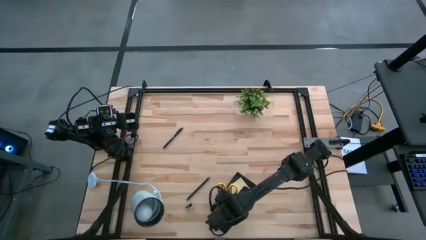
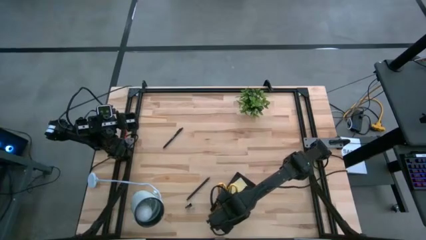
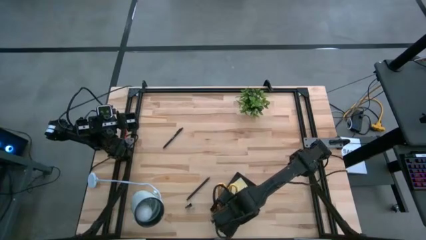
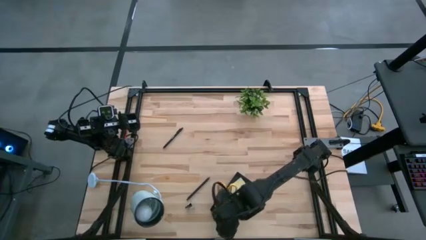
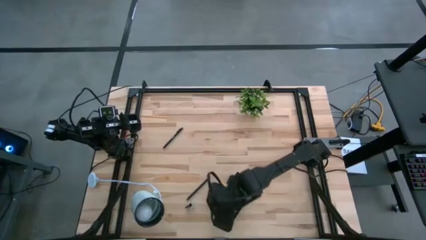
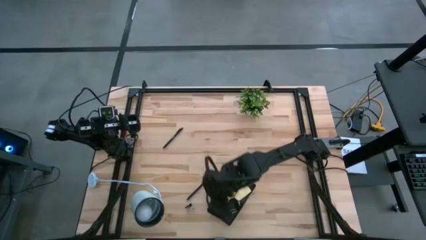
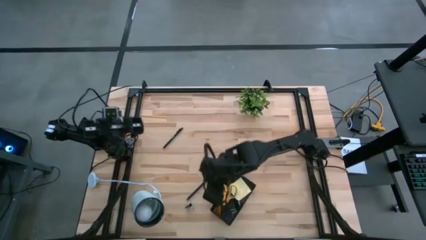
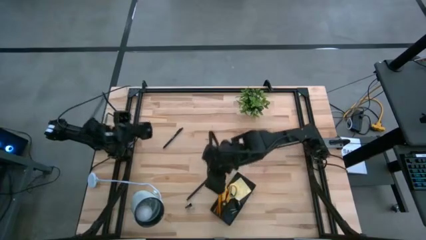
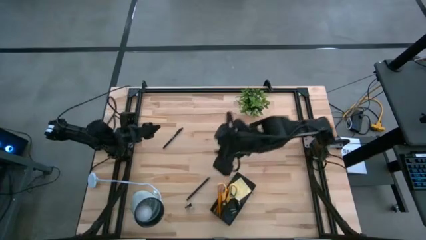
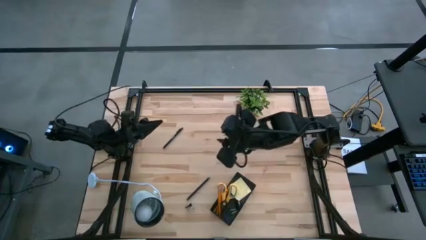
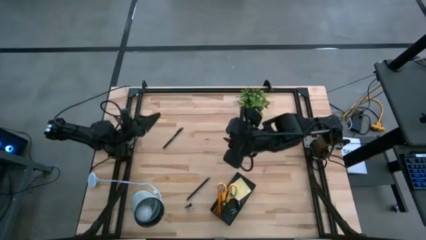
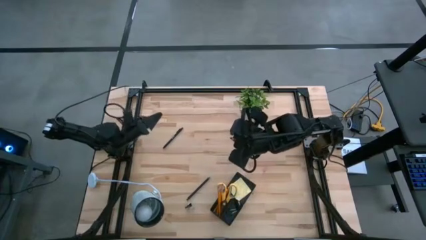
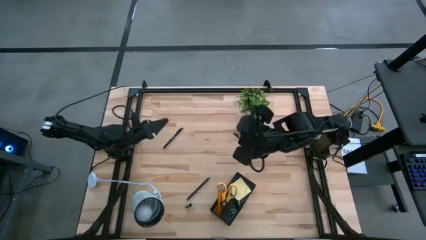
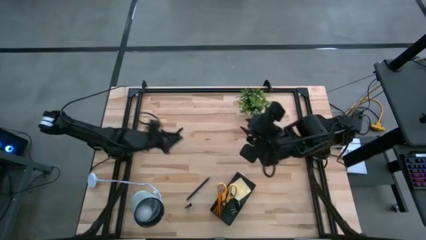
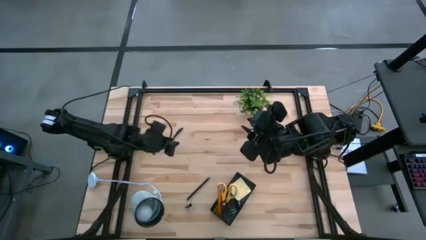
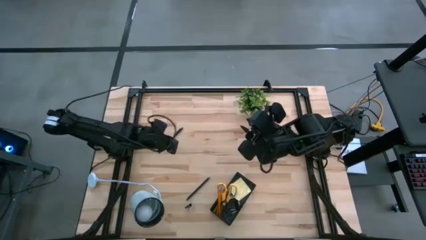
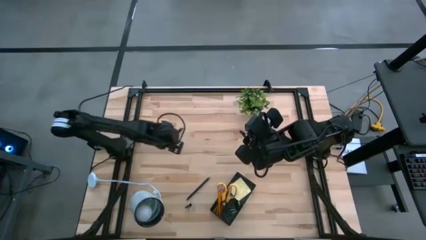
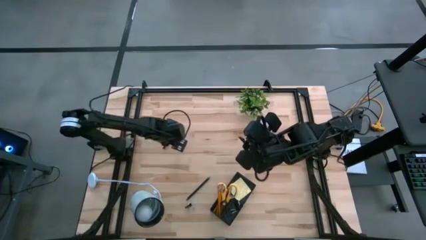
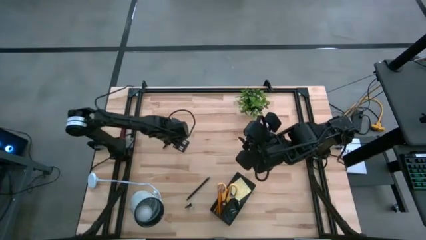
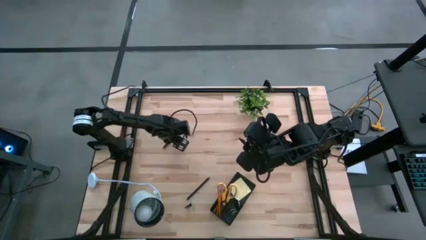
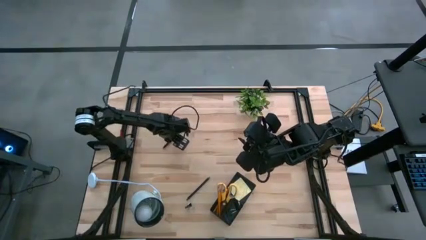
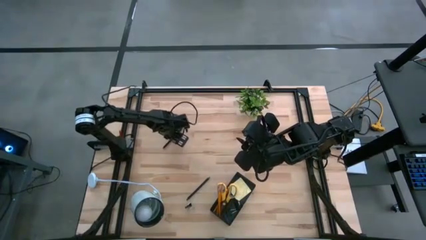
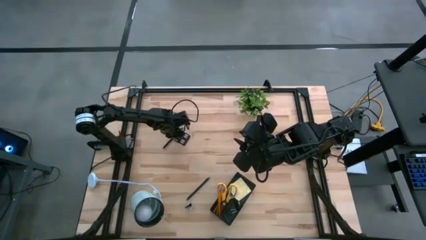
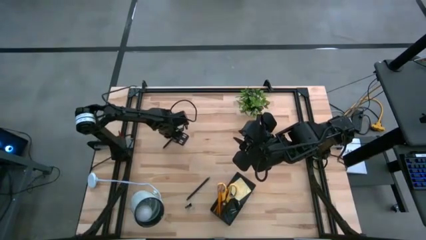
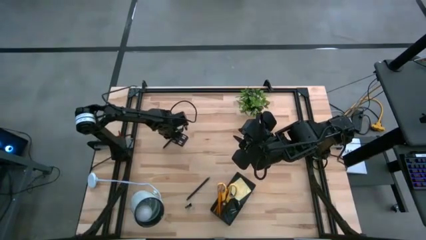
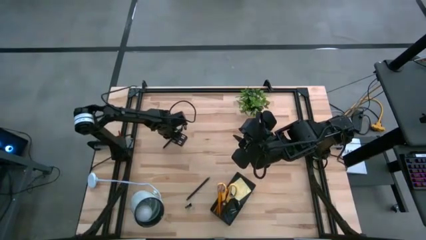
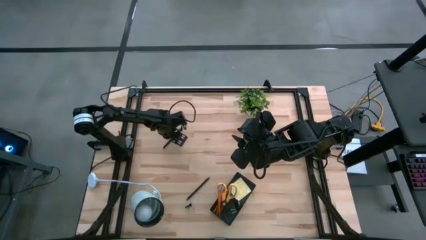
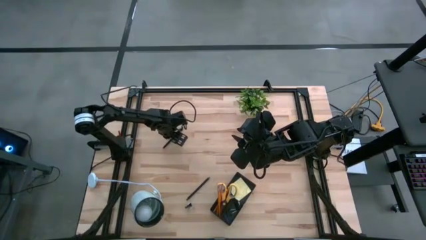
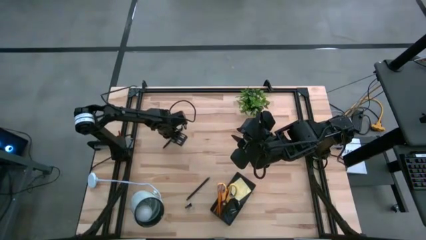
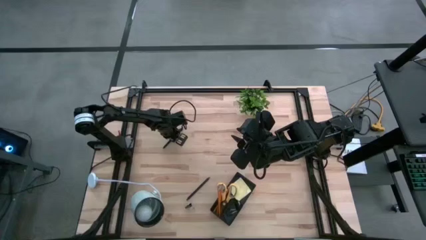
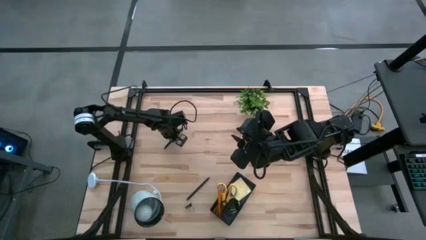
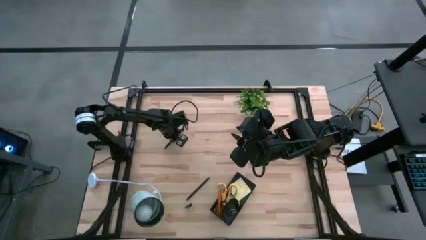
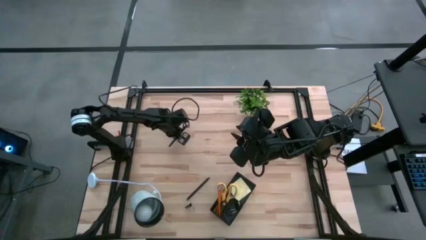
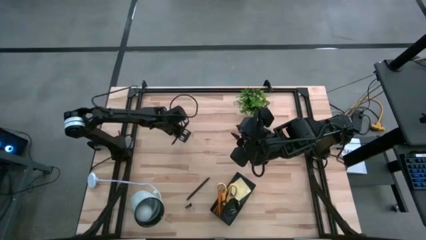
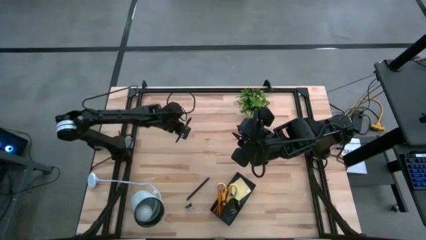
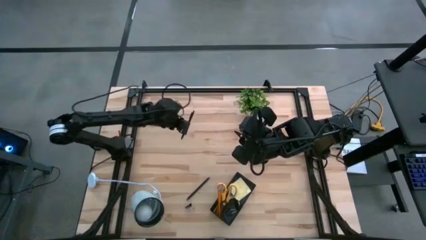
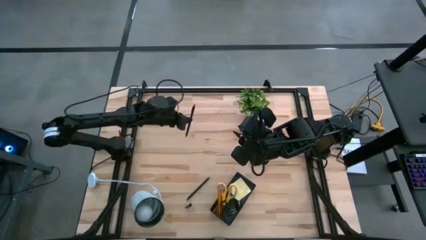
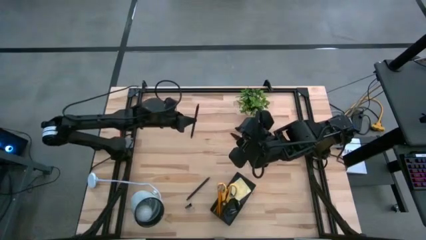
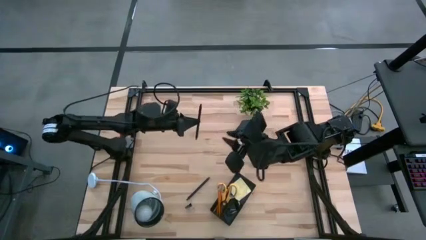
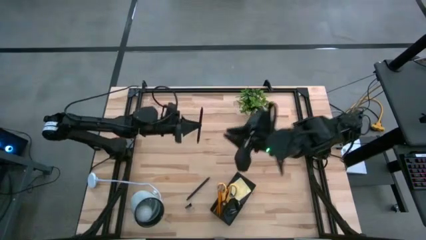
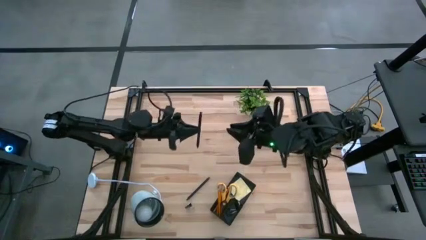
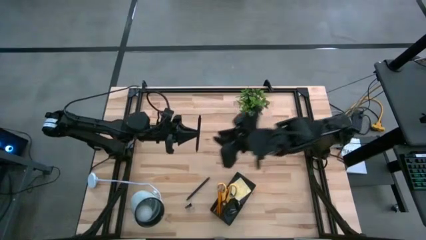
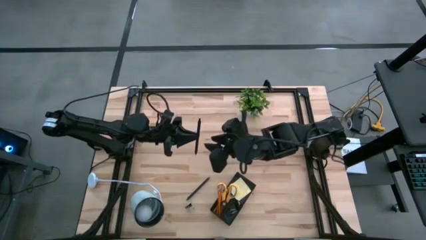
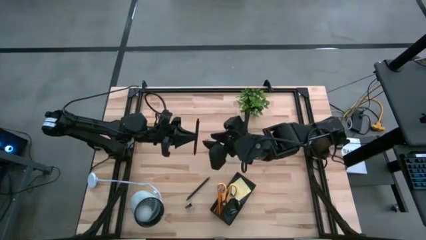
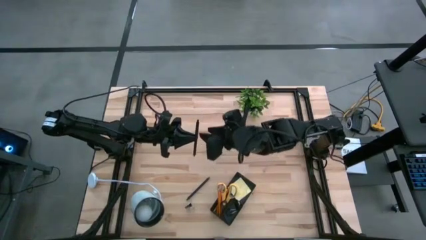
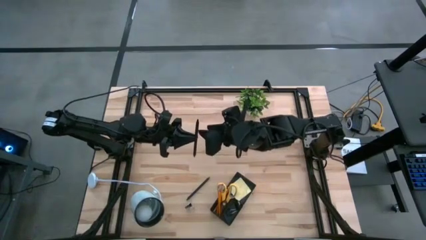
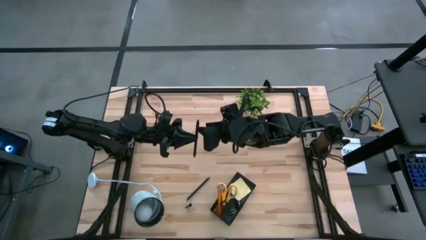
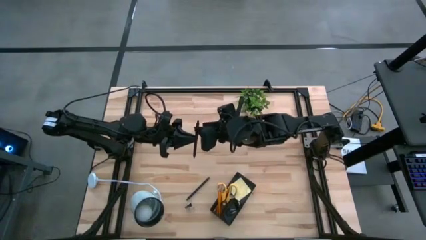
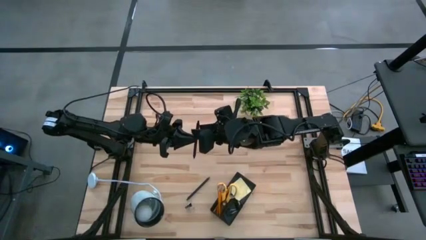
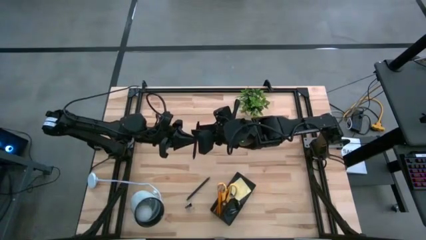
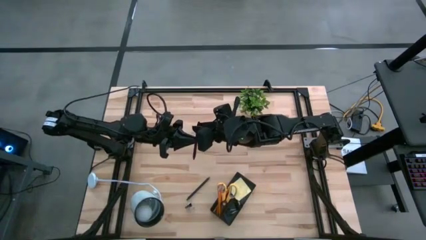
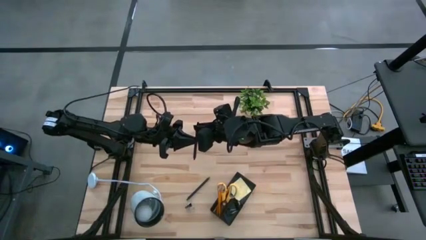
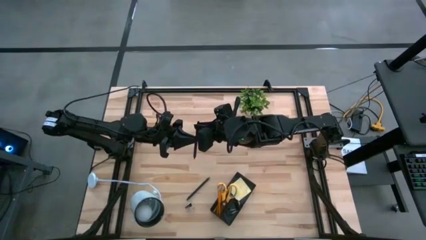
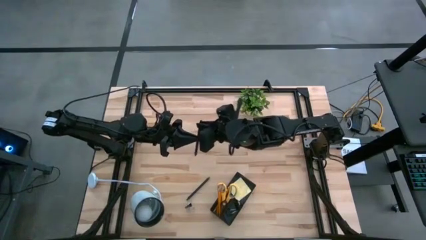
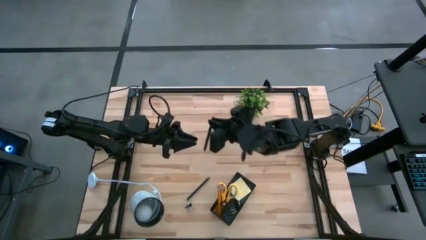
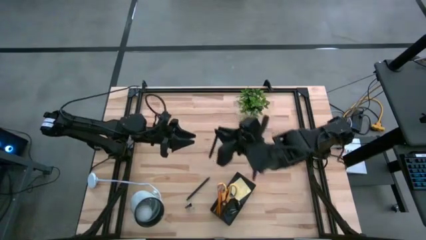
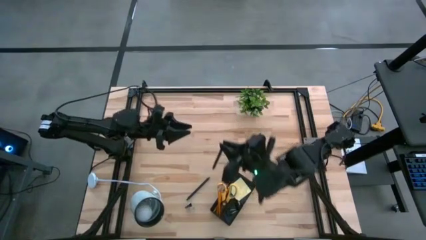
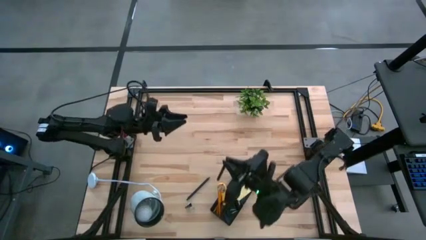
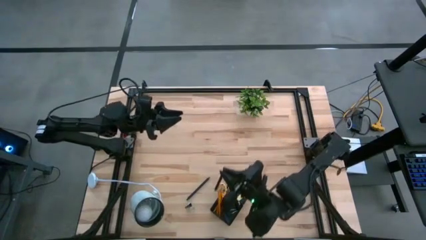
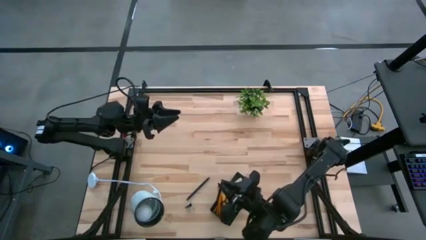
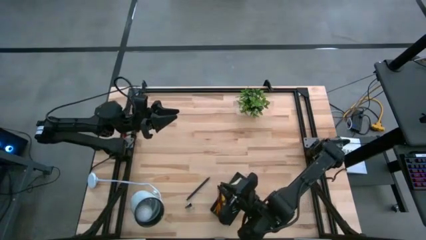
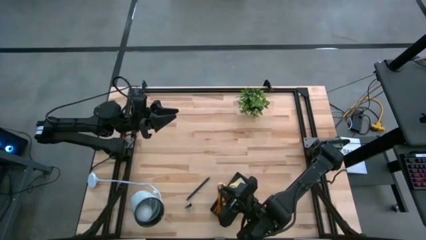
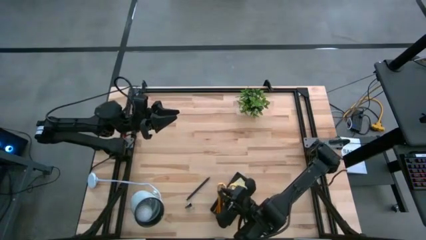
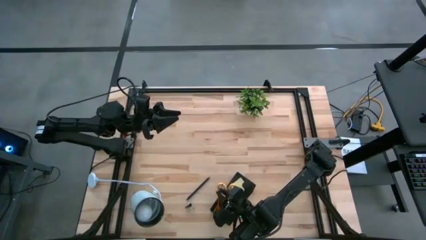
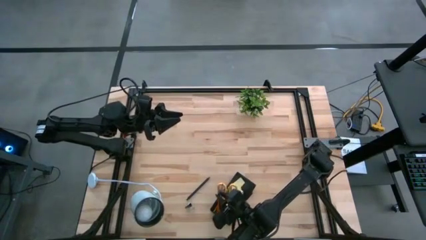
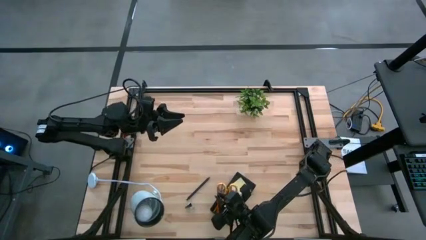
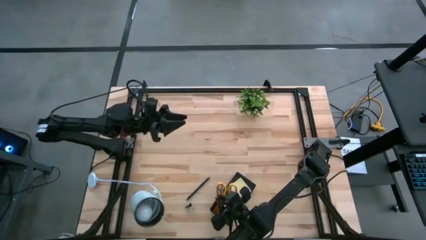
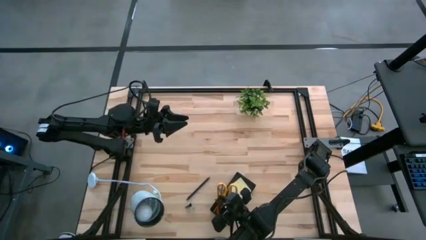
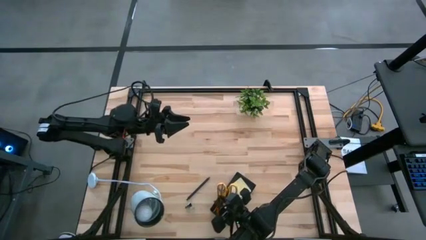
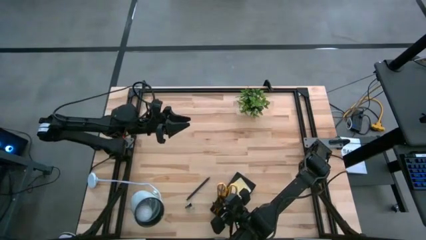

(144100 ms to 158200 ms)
Task: Pick and place office supplies into organizer
Put the top pen into the desk organizer

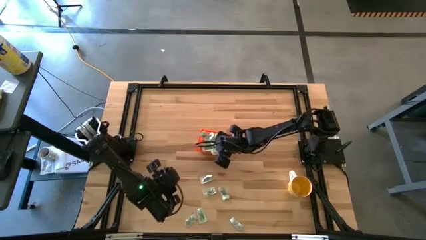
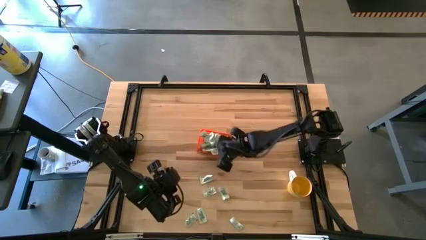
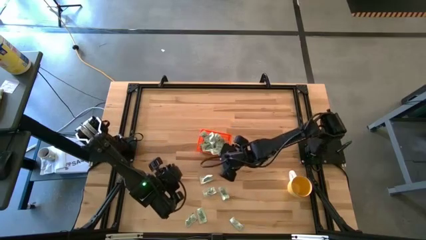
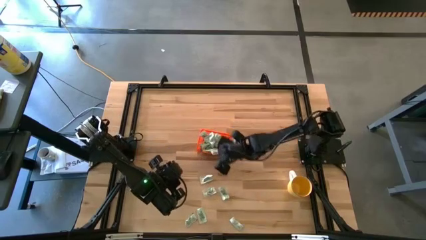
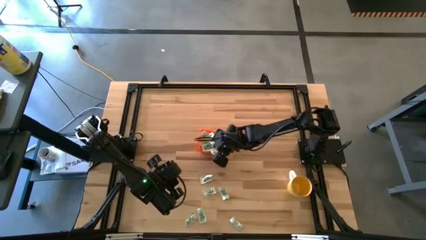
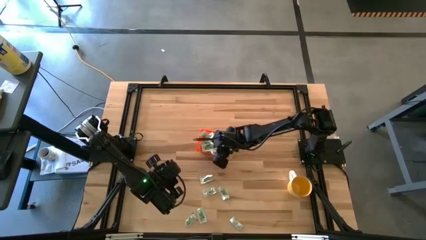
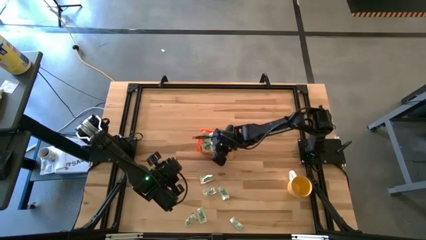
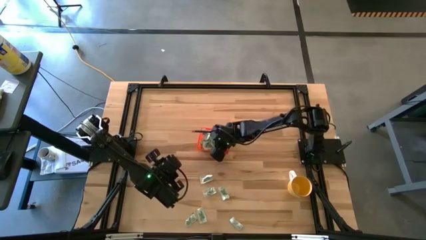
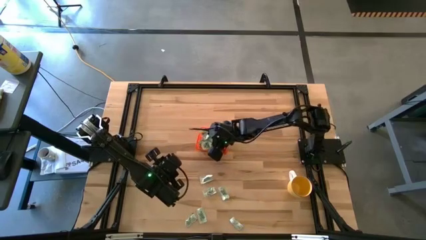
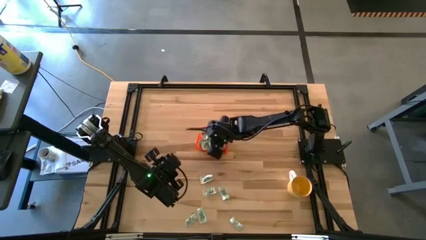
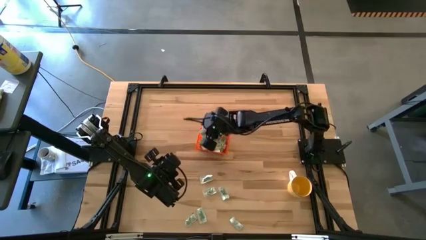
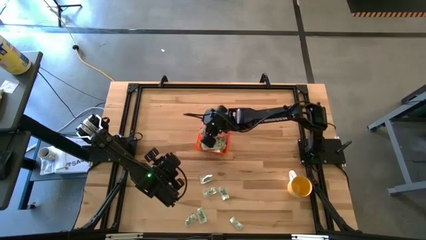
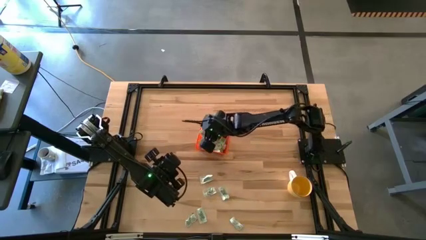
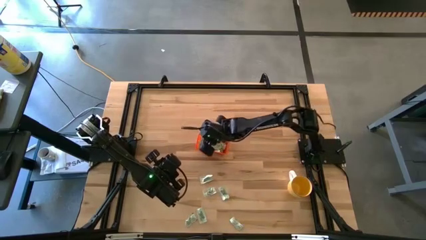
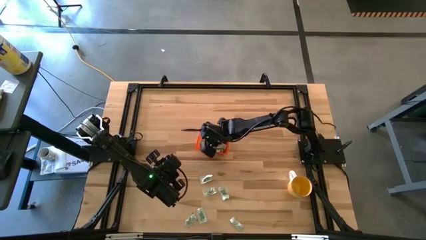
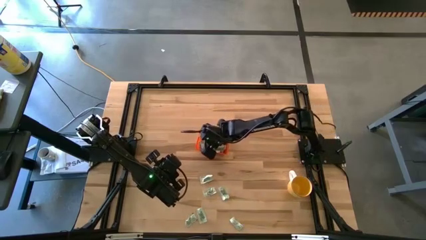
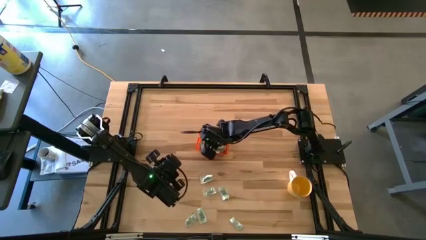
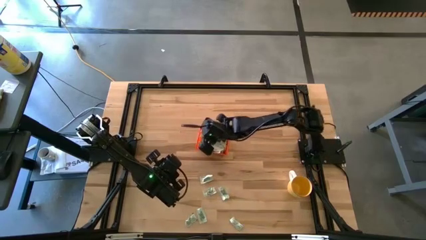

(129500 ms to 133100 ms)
Task: Pick and place Stevia / Truvia into bins
Adjust the light green stevia packets in the orange bin
